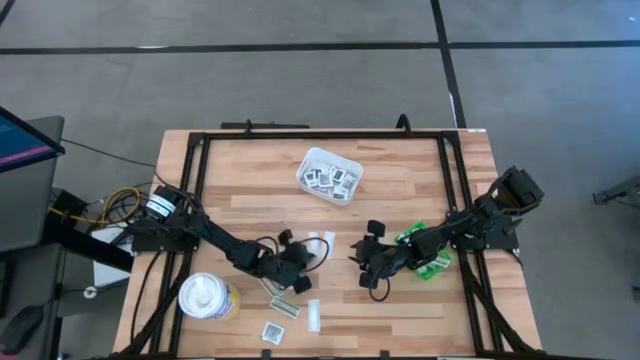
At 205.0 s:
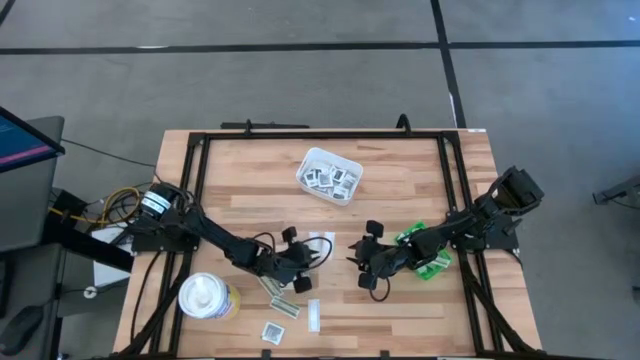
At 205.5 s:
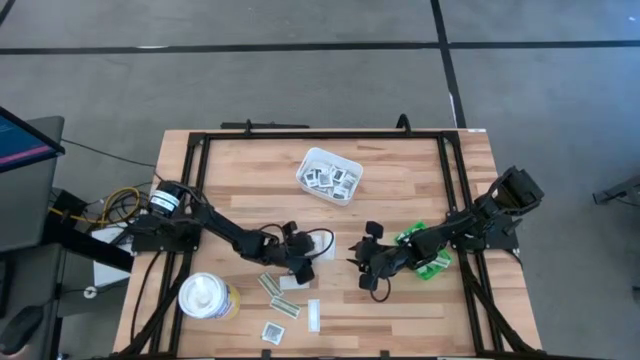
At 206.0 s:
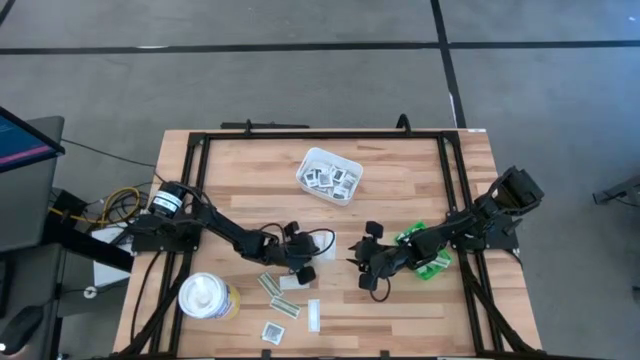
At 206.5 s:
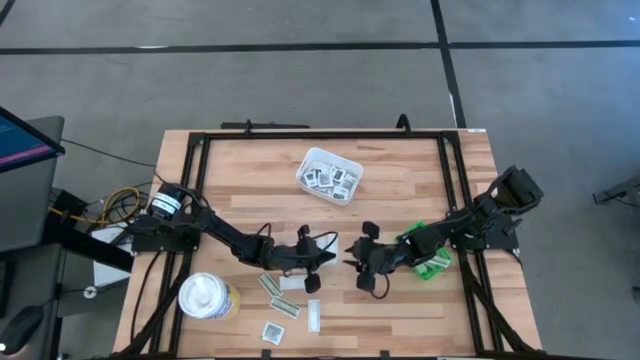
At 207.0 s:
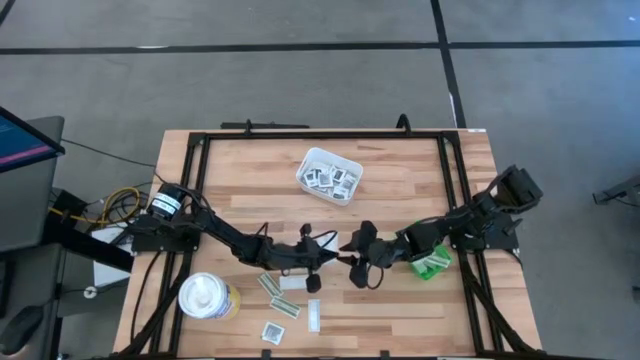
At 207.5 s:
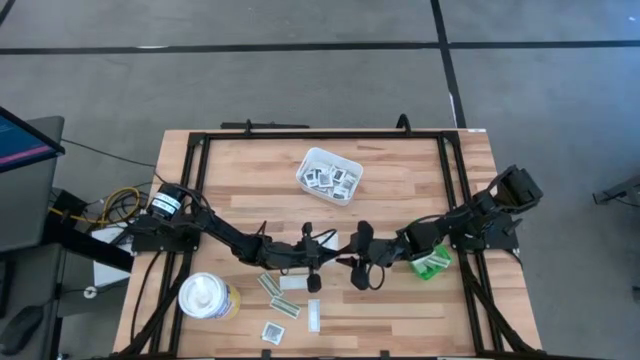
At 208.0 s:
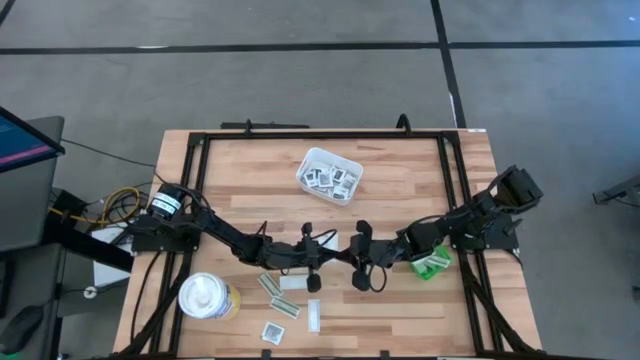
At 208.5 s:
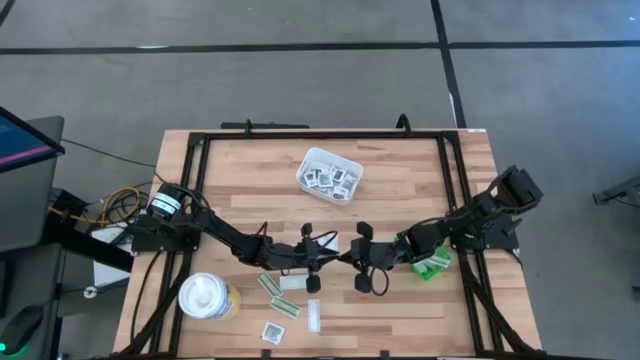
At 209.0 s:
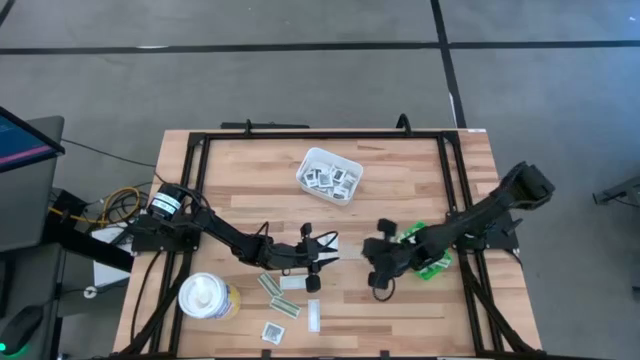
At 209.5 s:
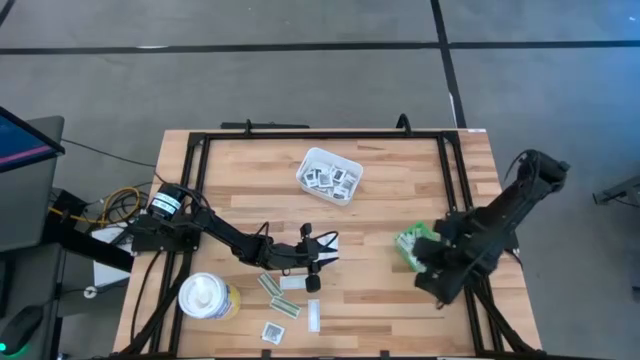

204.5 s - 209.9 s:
Task: Pick & Place First Aid Supplies
Put the bandage pack into the green bin

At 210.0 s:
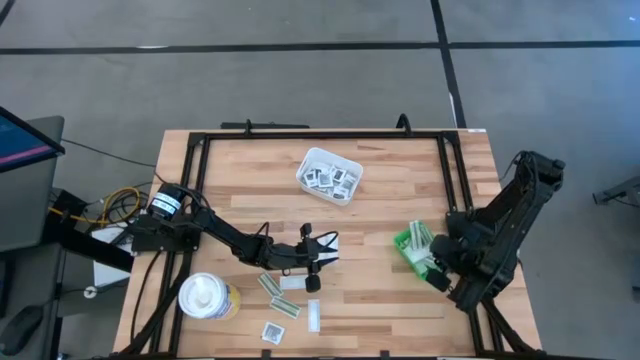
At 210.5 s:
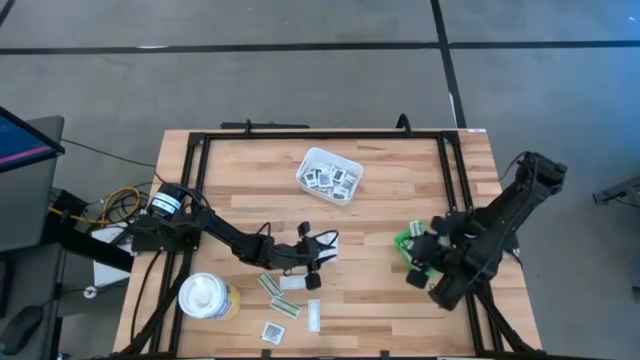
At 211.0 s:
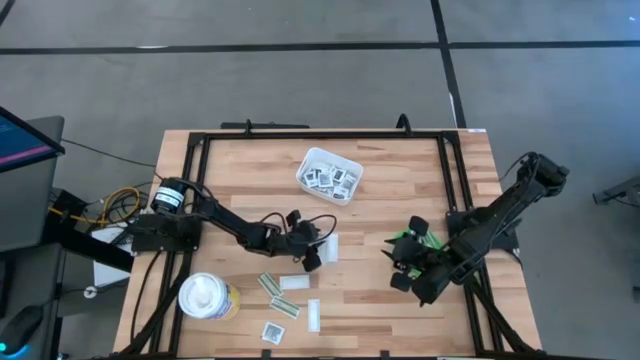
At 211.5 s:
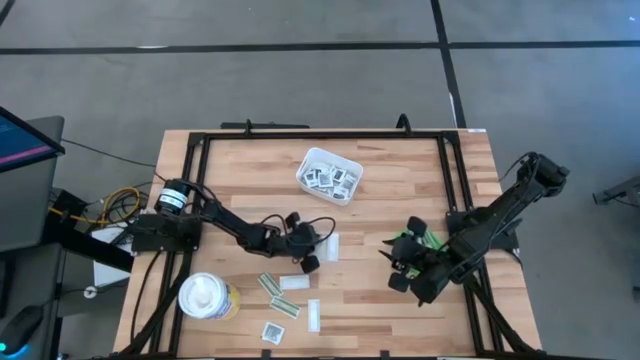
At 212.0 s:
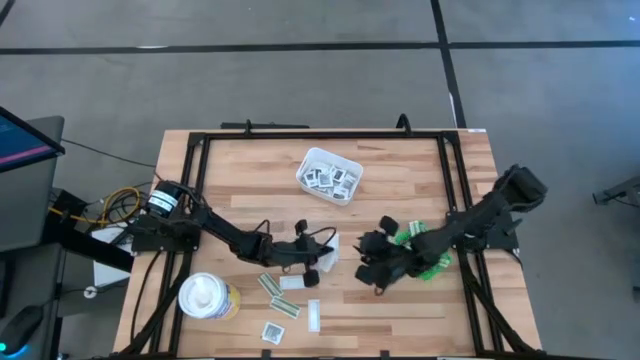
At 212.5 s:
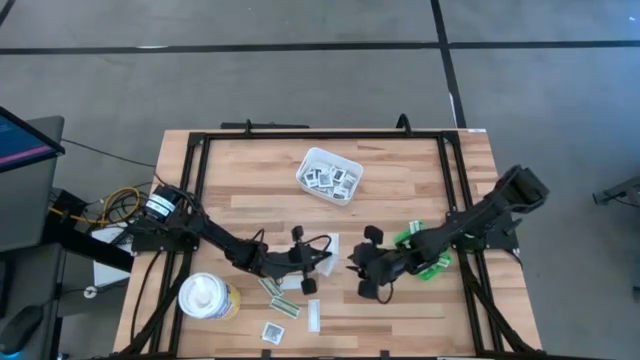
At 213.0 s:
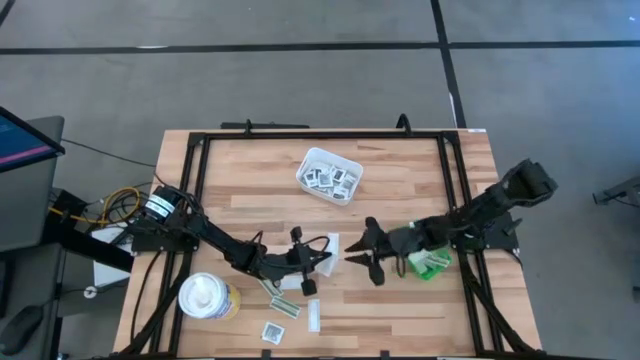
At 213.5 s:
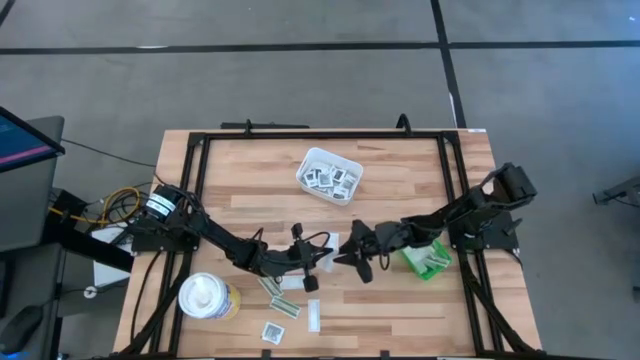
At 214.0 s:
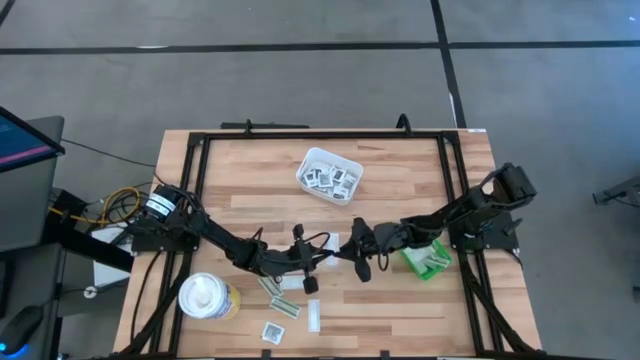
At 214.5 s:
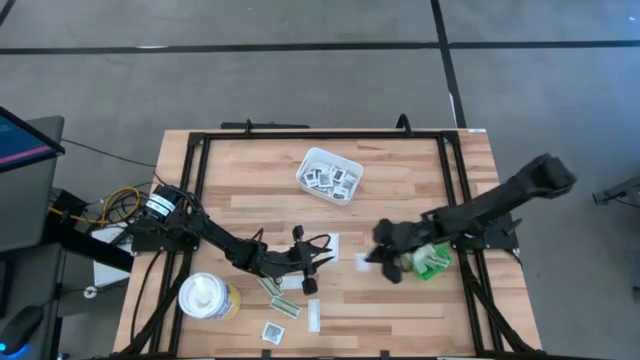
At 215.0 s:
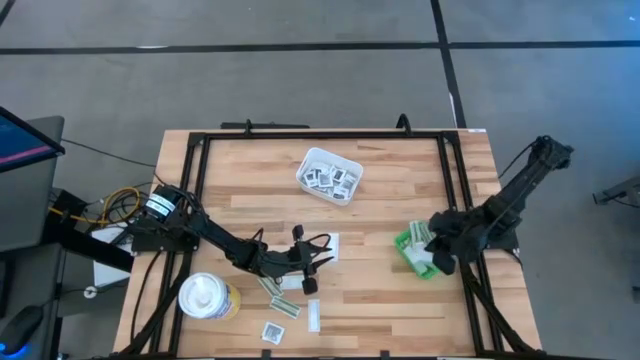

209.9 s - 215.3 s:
Put the bandage pack into the green bin

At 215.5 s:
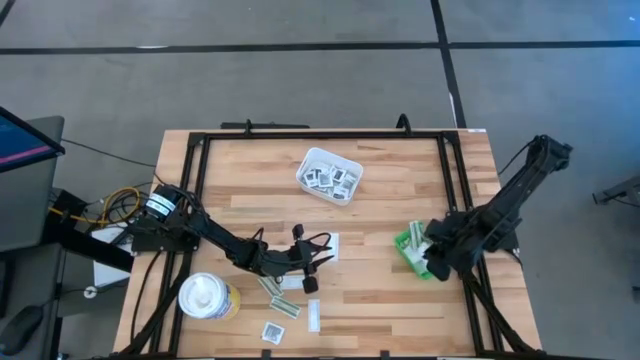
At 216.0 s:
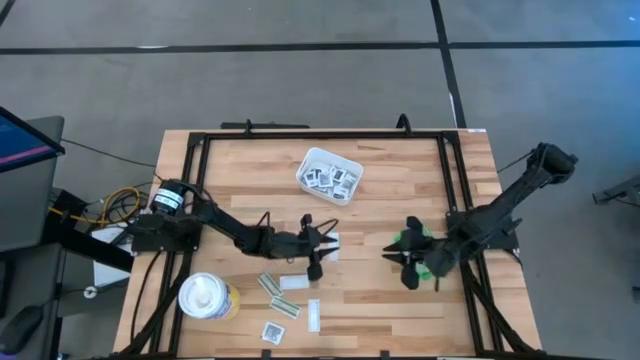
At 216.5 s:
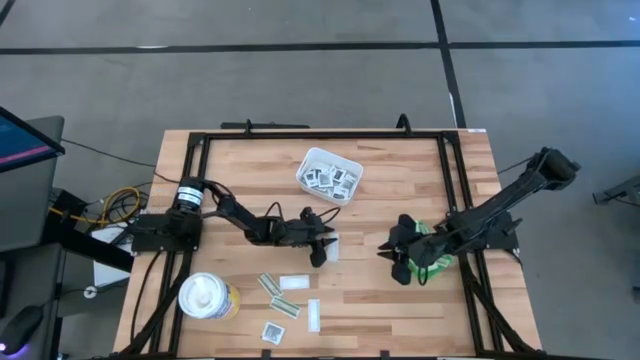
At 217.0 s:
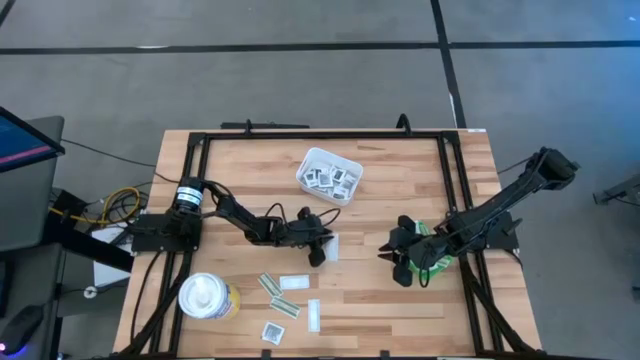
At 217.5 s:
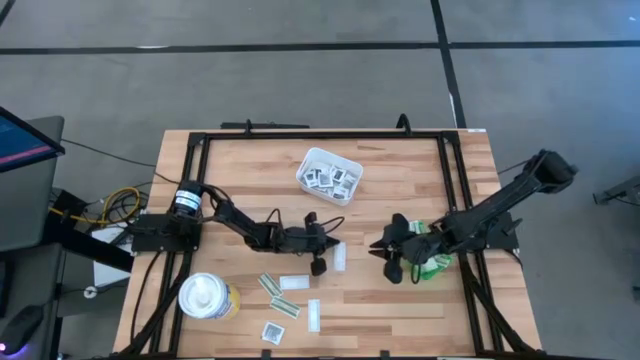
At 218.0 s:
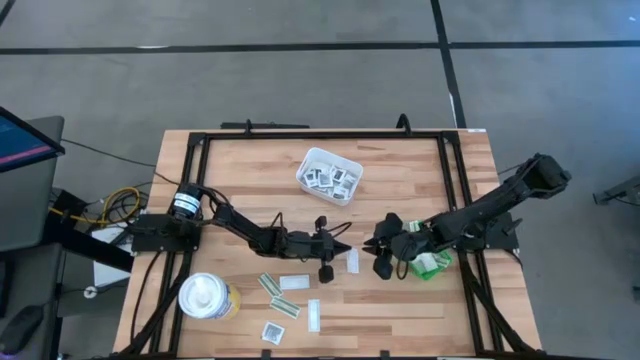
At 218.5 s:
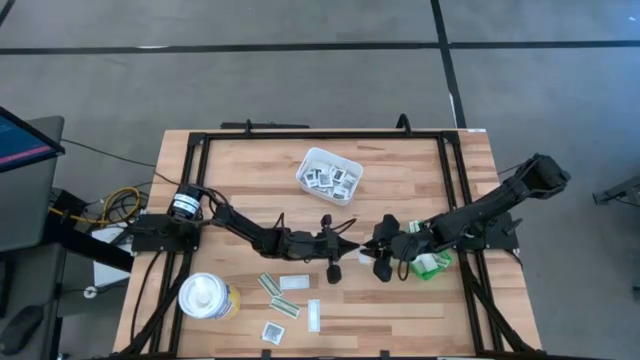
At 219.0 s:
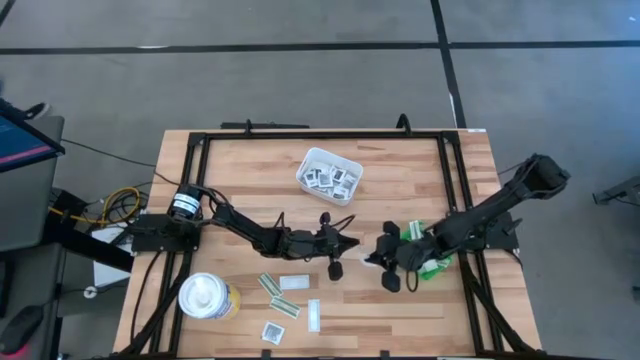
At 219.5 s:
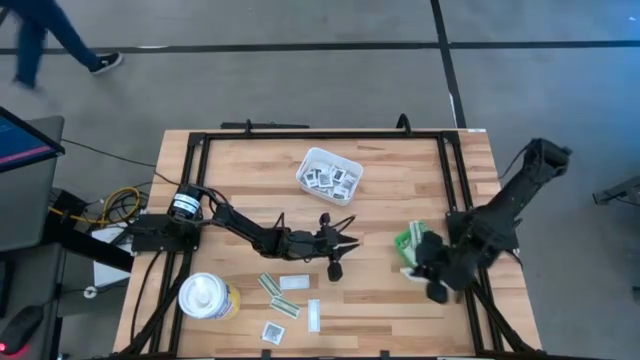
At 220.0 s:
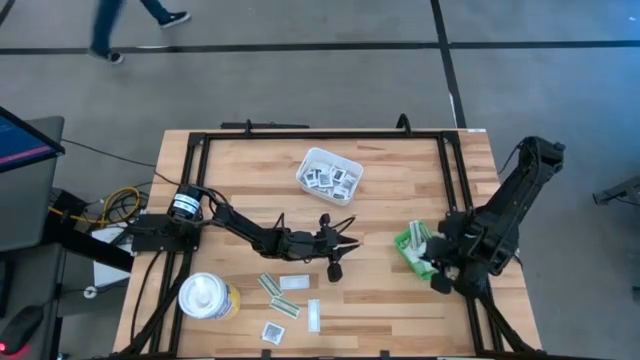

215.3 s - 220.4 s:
Put the bandage pack into the green bin

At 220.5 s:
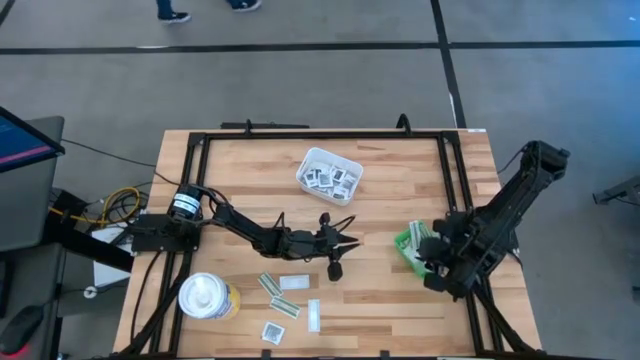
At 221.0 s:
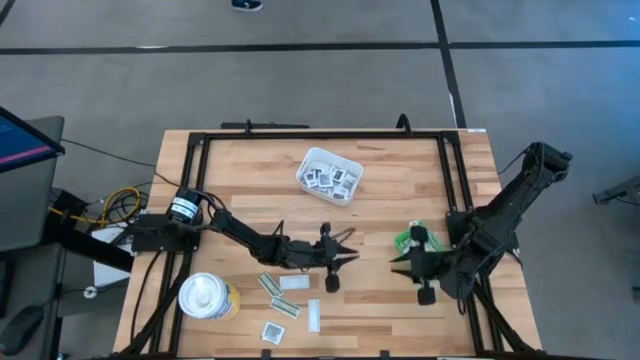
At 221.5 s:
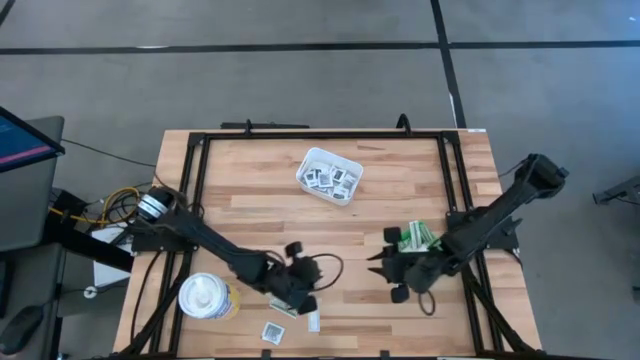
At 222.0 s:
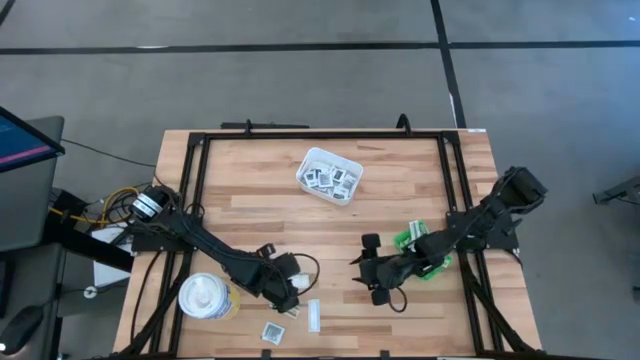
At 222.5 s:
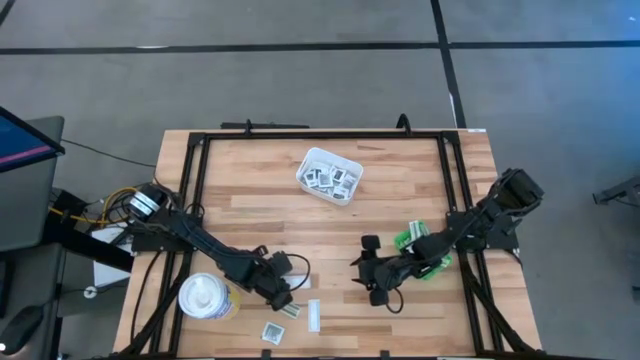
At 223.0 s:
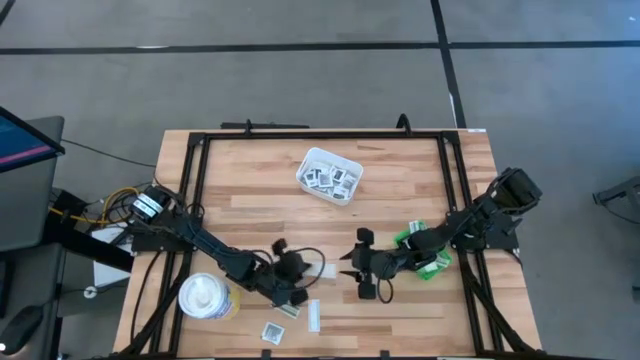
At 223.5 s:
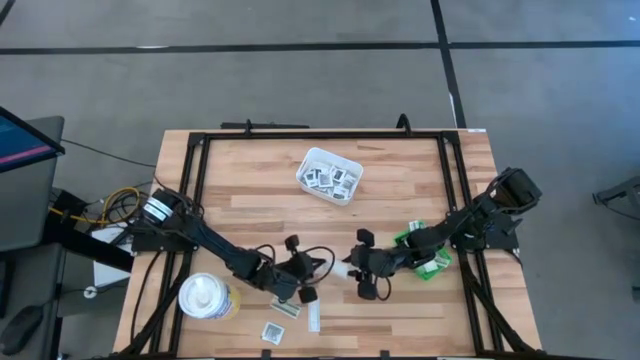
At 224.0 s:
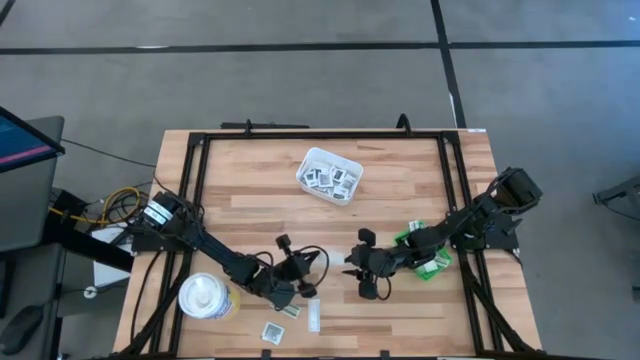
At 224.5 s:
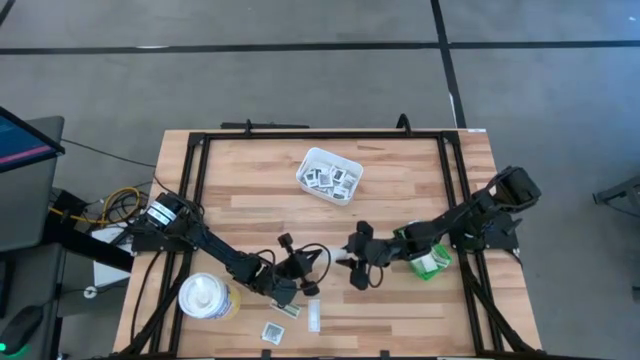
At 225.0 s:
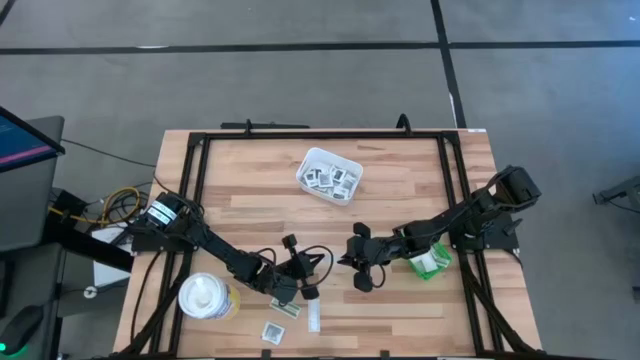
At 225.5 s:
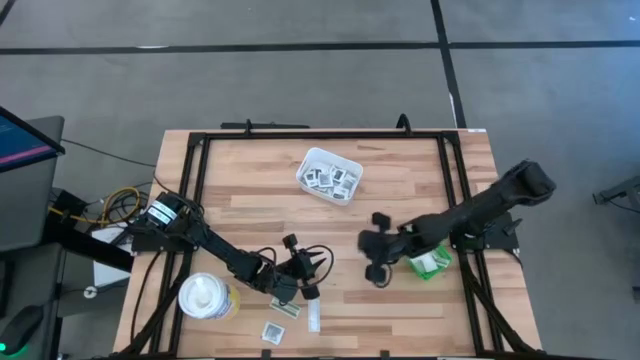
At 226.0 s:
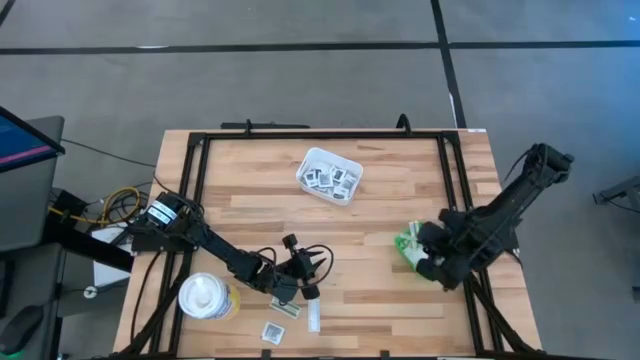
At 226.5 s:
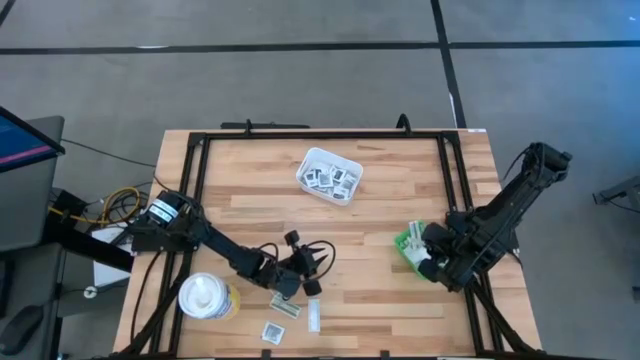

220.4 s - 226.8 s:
Put the bandage pack into the green bin
